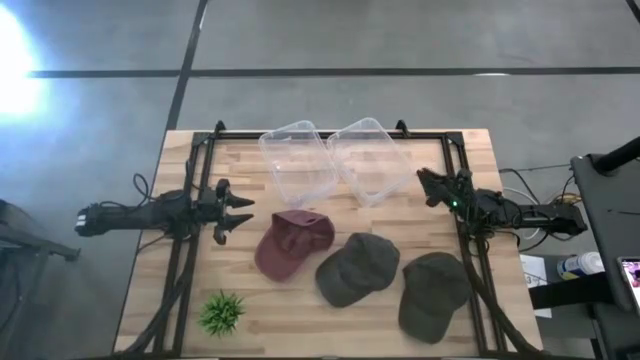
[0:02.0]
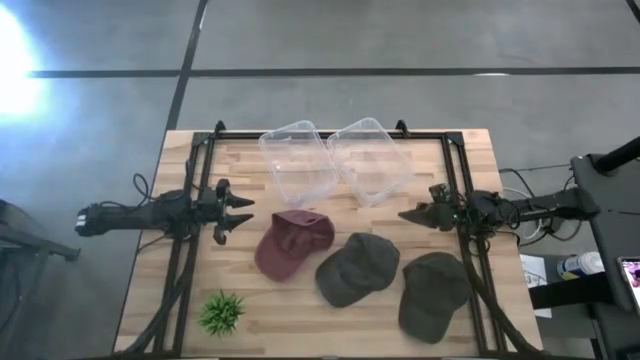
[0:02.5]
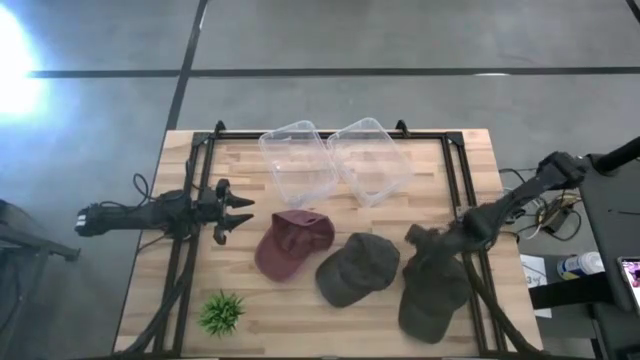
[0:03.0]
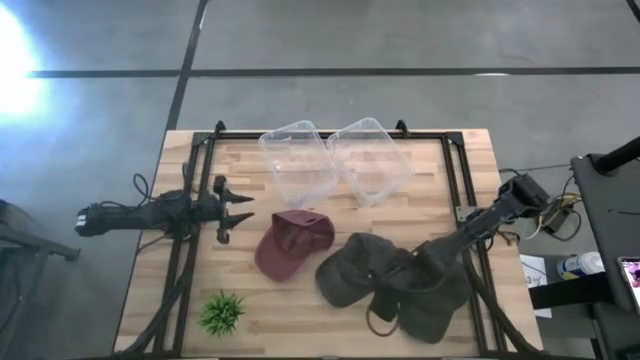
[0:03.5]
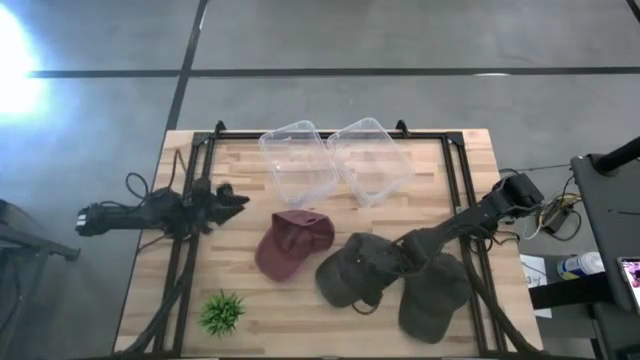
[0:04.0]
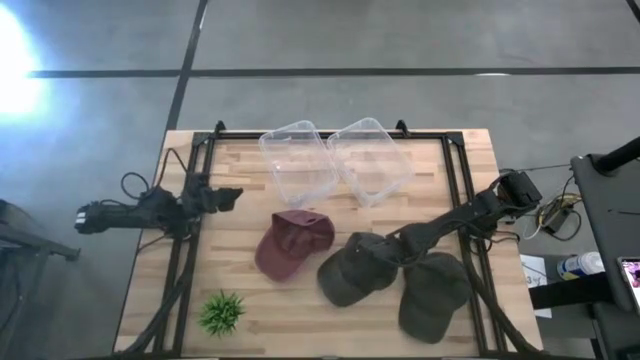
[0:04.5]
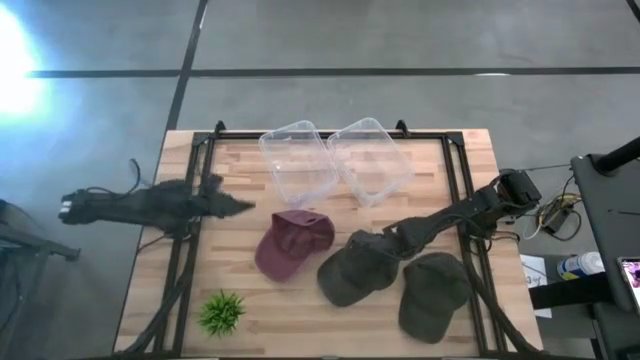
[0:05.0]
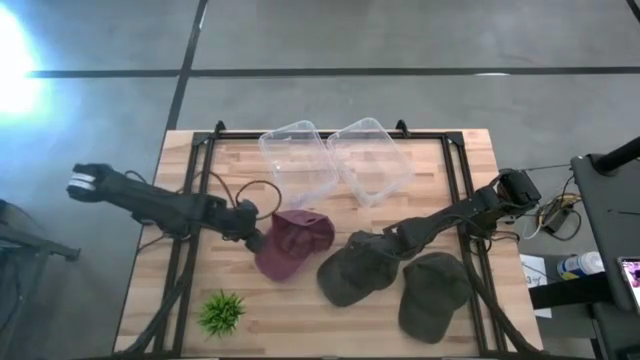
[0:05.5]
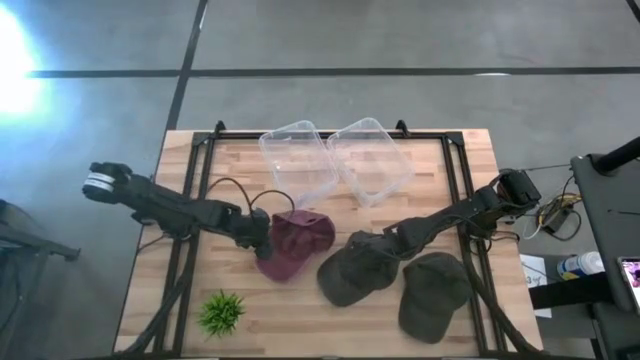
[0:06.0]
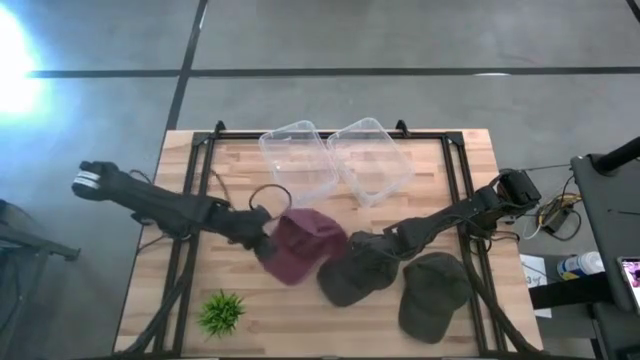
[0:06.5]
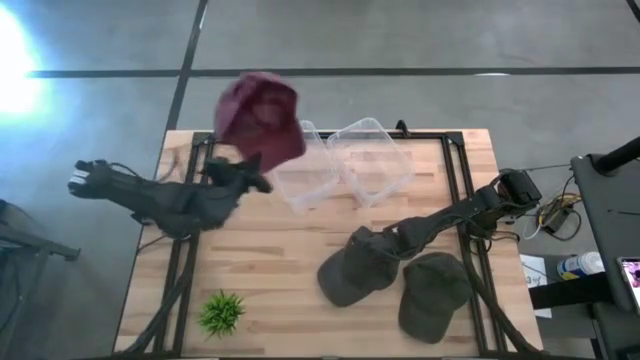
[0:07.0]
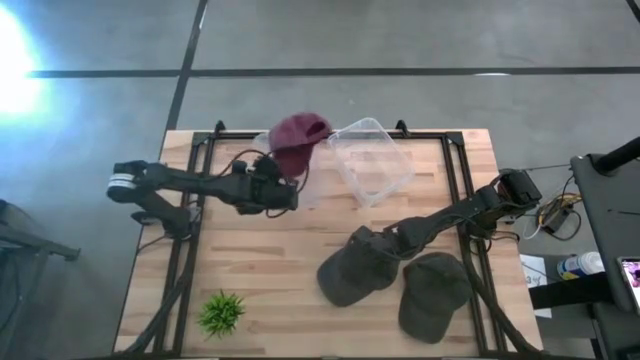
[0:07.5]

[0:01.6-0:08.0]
Task: Pick & Place hat
Put the red cap into the right transparent bin

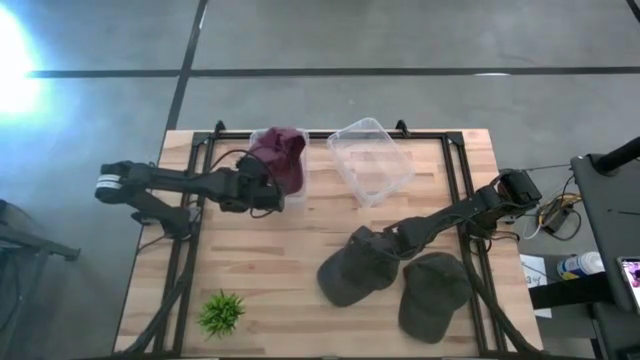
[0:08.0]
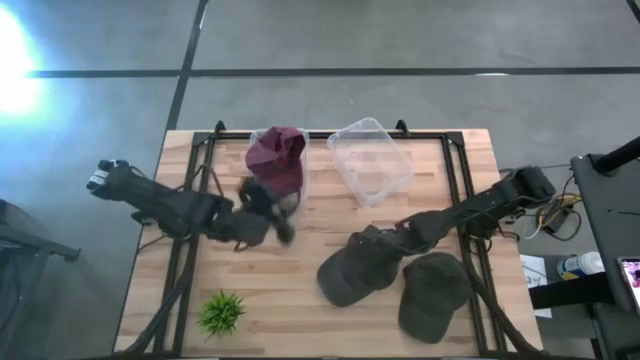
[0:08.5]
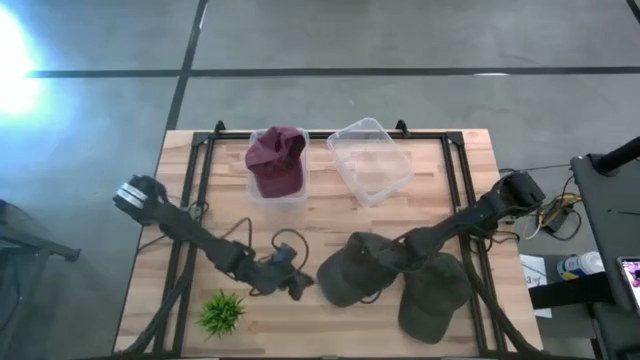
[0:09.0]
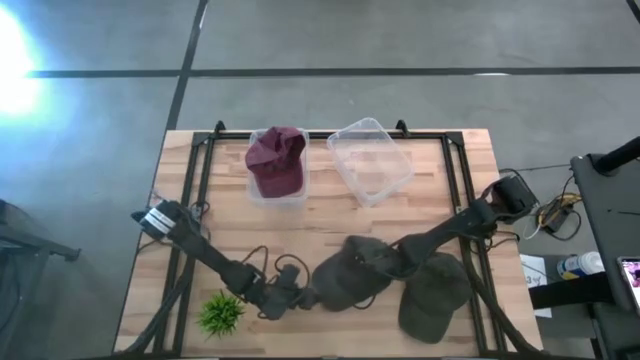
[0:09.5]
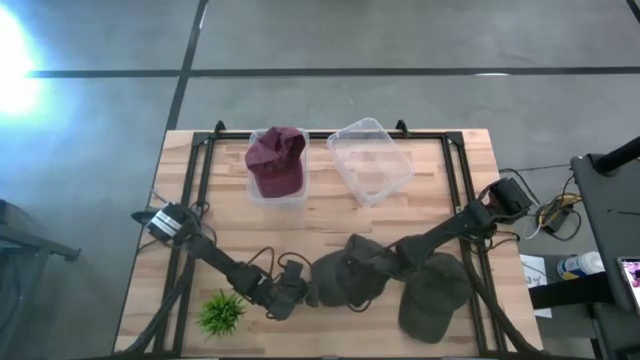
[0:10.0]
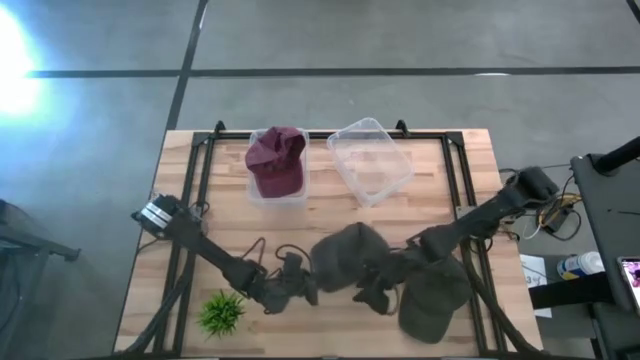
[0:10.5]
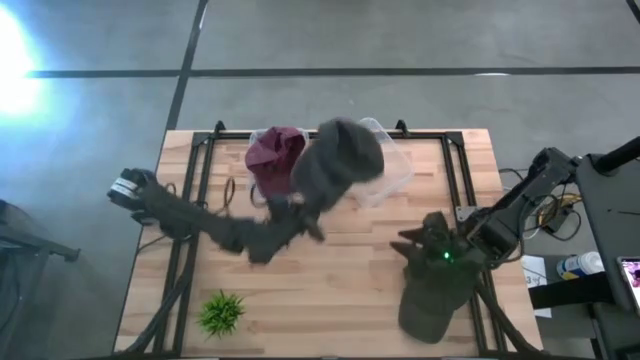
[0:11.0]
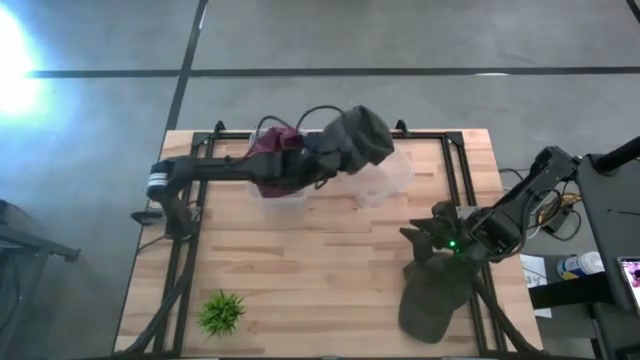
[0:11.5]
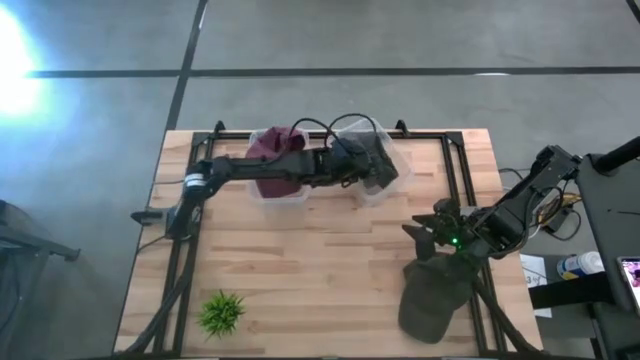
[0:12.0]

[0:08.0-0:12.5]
Put the left black cap into the right transparent bin

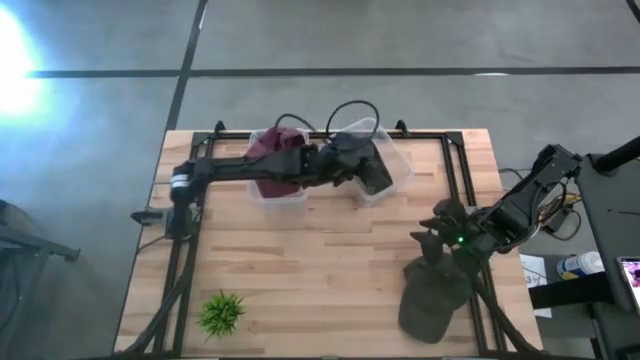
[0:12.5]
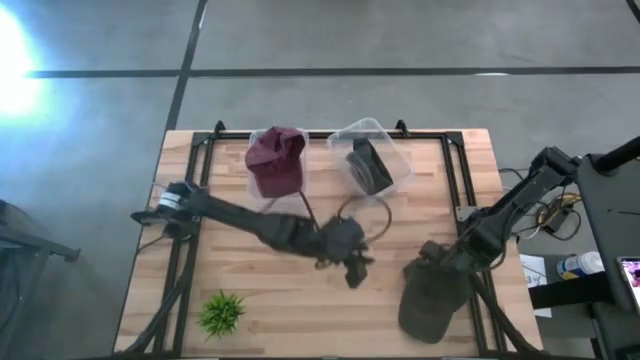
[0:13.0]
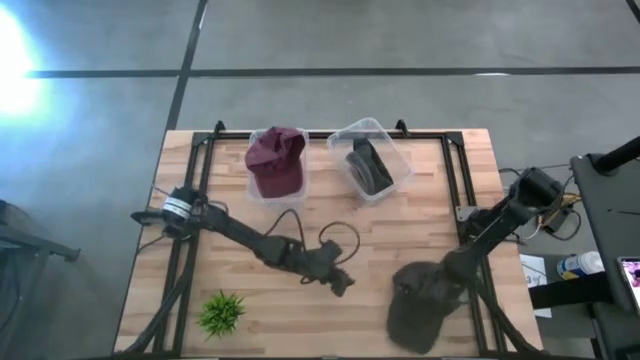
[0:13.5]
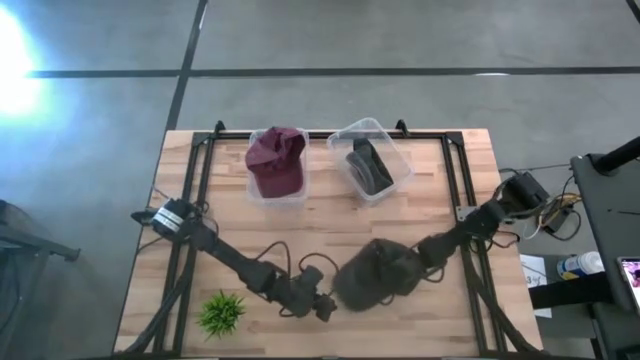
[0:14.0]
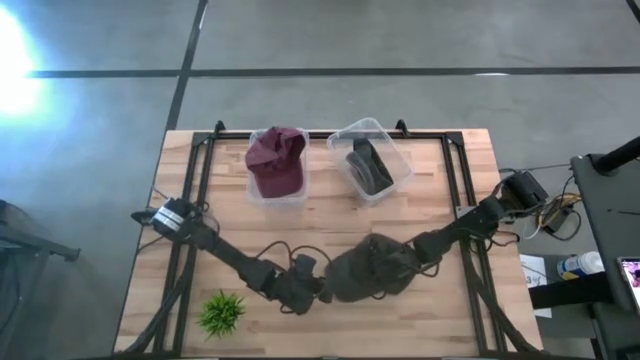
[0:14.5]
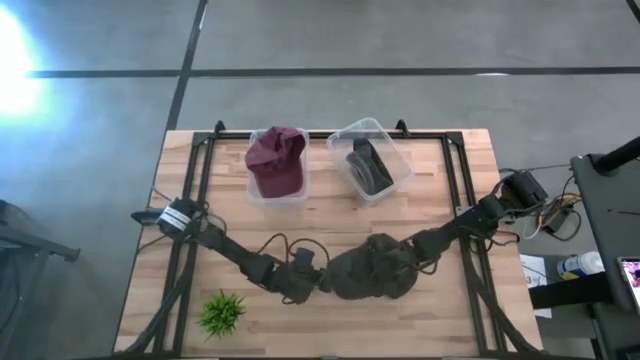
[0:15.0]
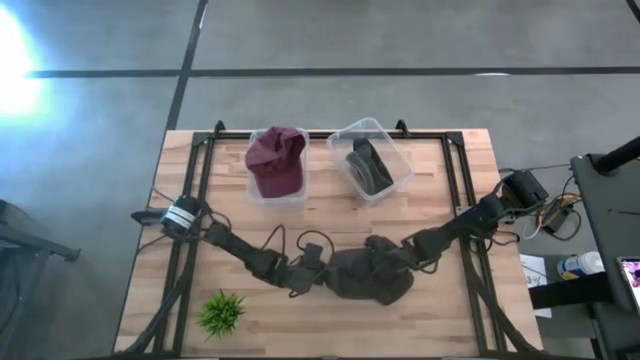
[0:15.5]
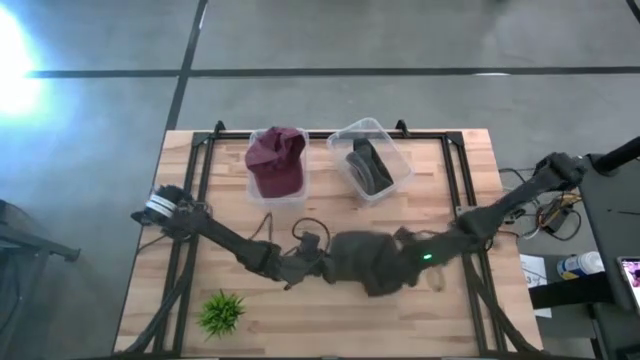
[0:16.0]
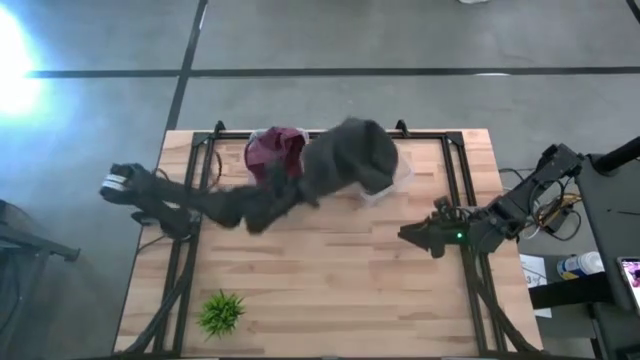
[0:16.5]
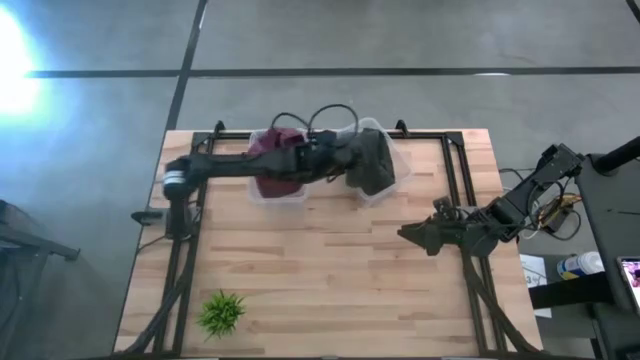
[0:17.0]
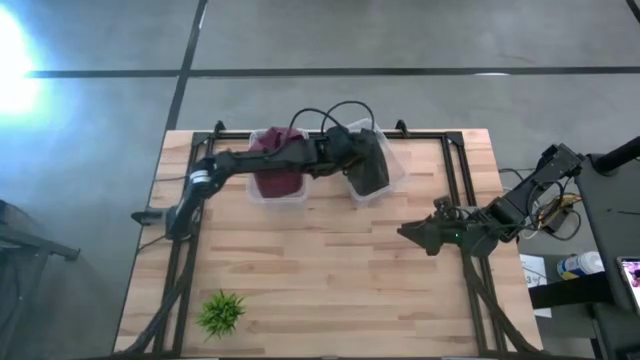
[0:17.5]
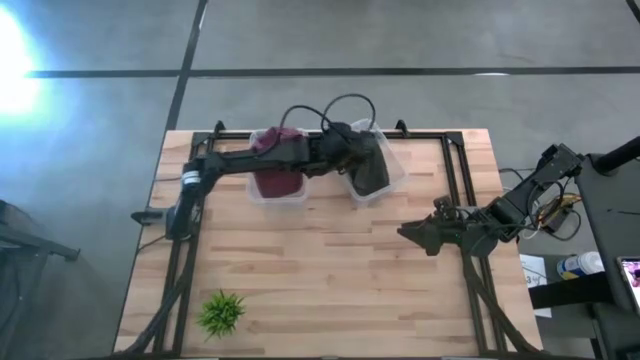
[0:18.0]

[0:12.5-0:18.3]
Put the black cap into the right transparent bin

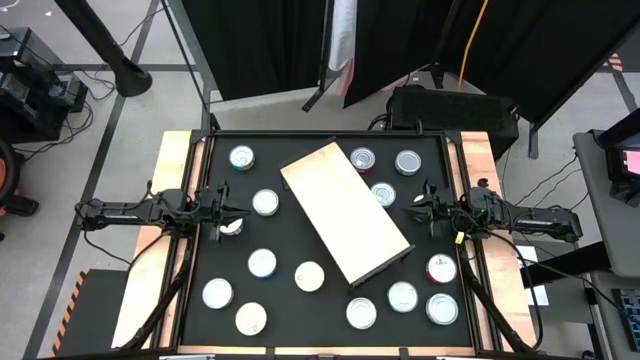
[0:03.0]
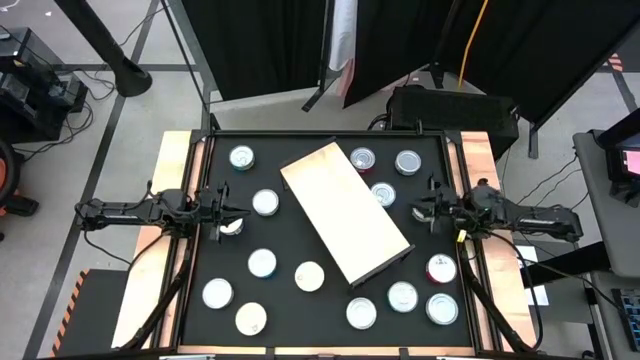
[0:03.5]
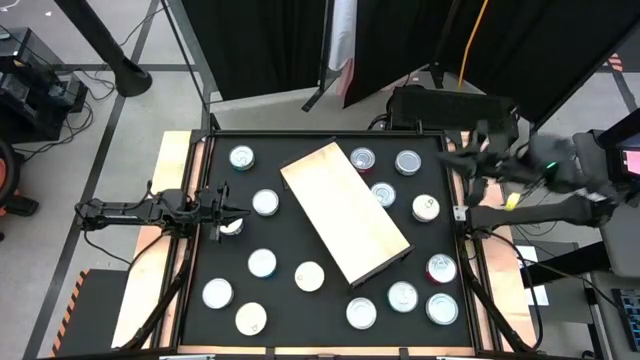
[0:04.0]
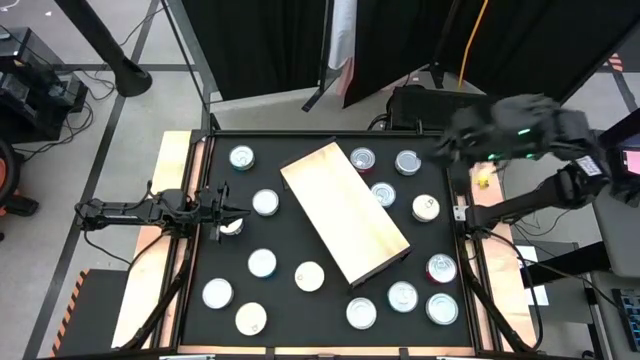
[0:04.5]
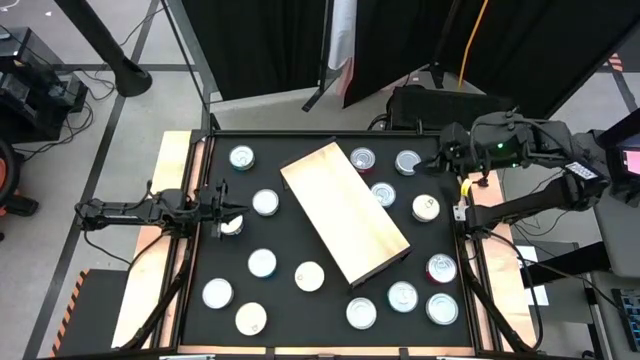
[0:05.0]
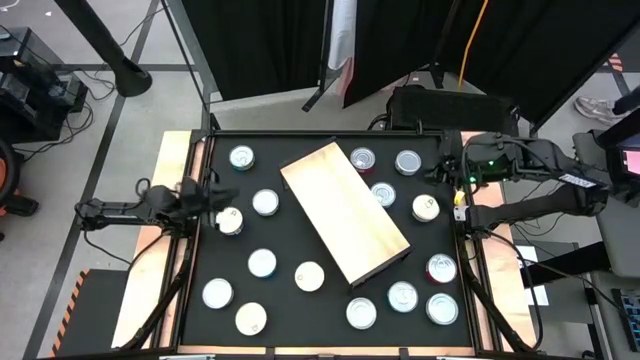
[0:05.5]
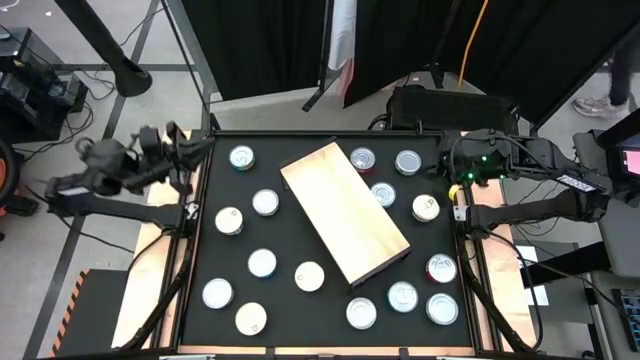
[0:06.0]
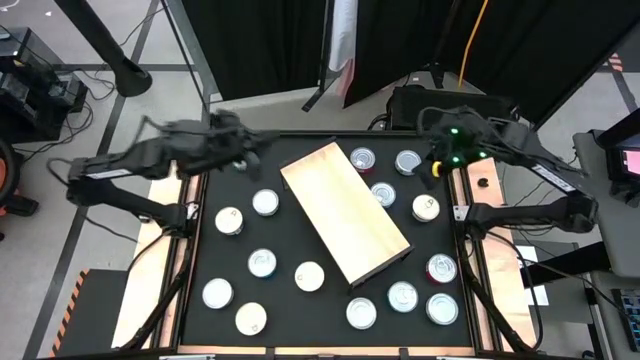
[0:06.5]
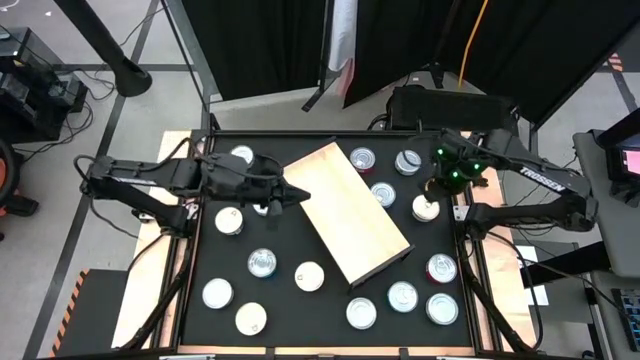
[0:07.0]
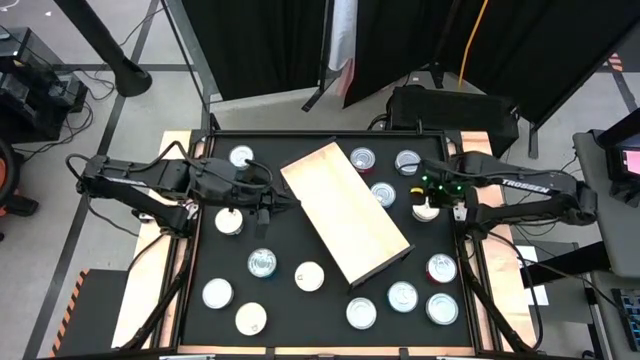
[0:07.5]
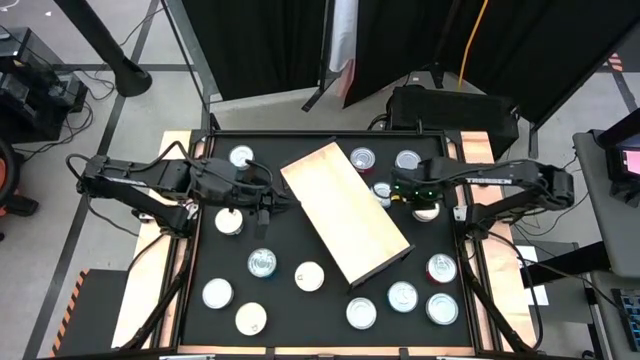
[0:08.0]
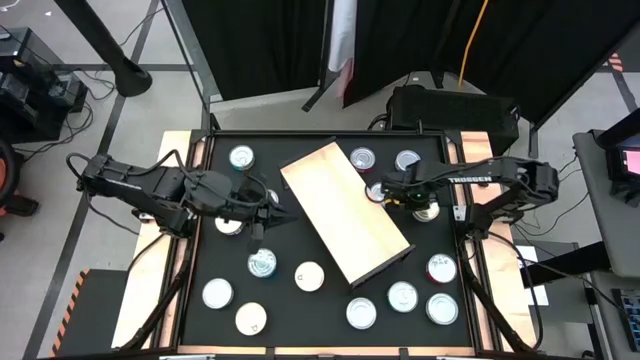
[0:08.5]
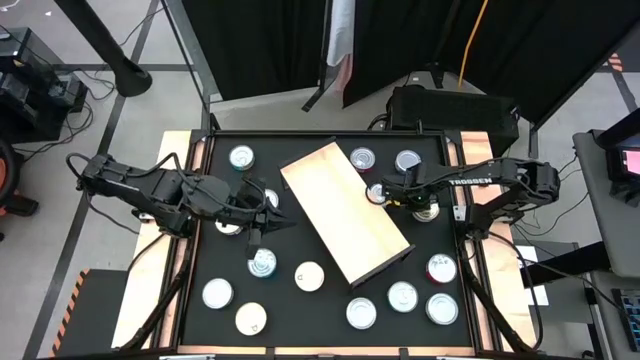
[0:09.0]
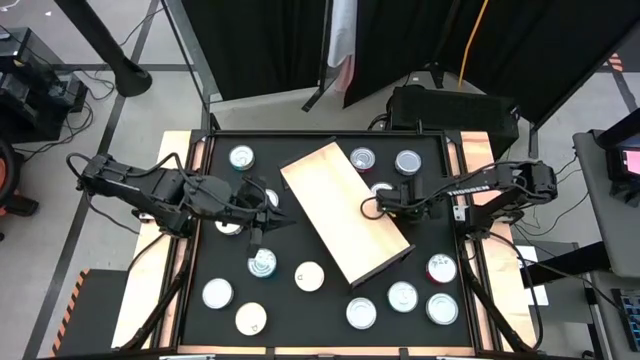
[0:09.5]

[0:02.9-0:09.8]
Task: Stack canned seafood by type on shelf
Put the blue-pink tuna can on the shelf
